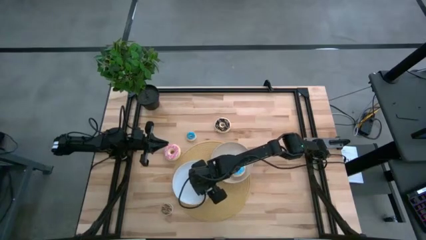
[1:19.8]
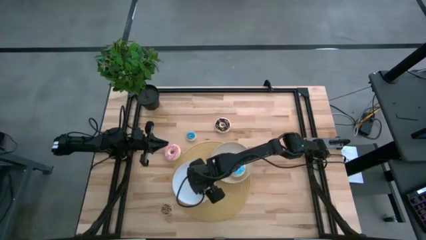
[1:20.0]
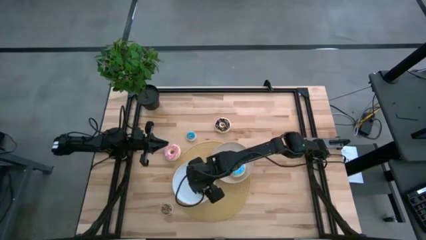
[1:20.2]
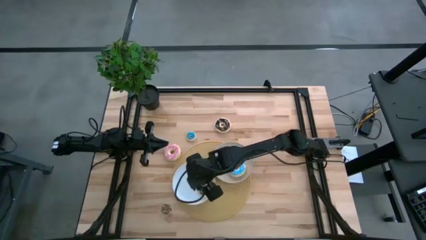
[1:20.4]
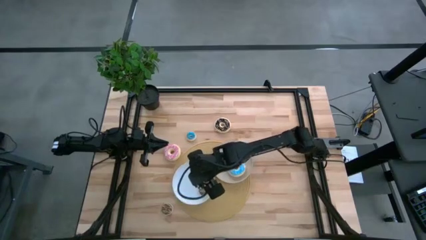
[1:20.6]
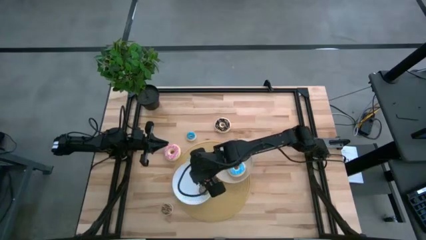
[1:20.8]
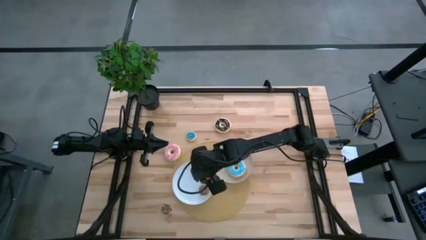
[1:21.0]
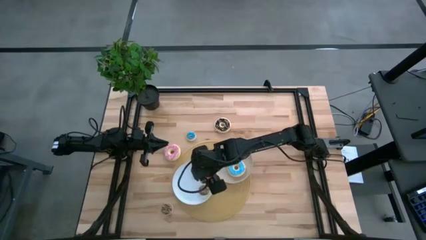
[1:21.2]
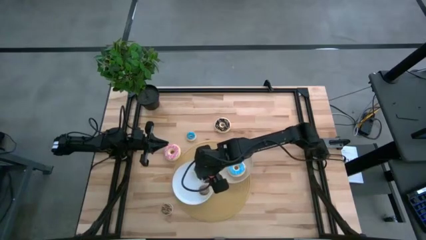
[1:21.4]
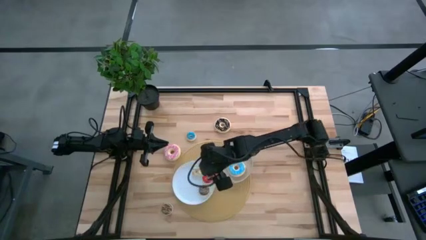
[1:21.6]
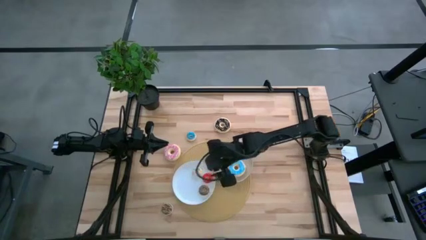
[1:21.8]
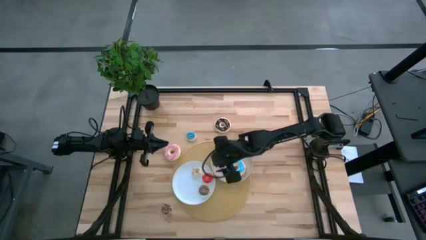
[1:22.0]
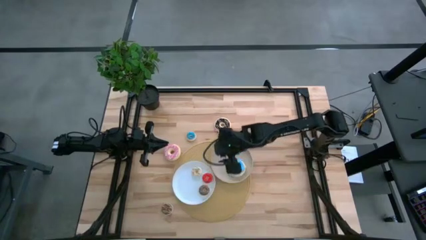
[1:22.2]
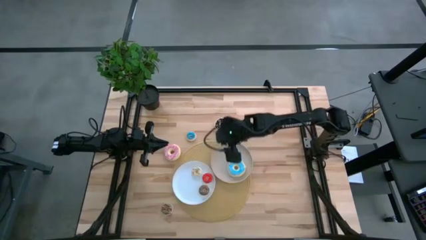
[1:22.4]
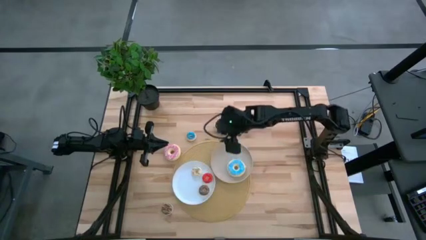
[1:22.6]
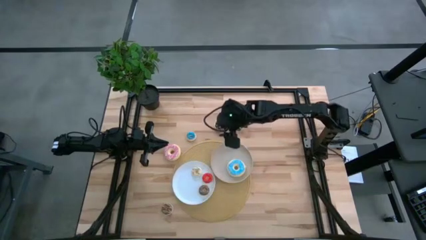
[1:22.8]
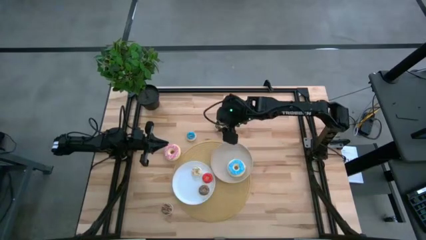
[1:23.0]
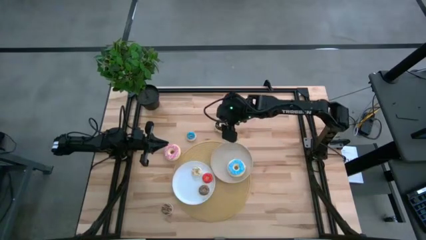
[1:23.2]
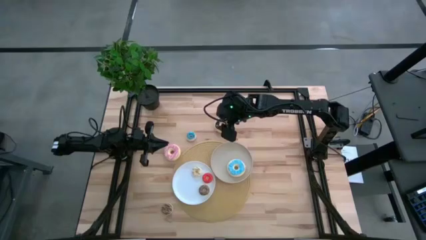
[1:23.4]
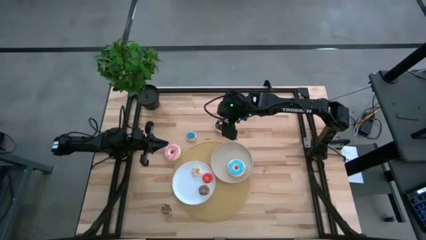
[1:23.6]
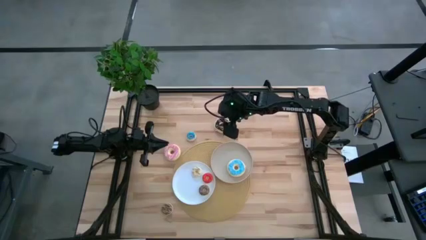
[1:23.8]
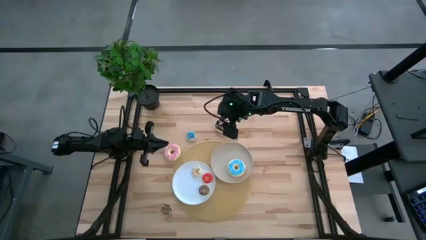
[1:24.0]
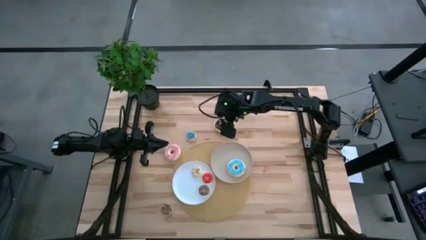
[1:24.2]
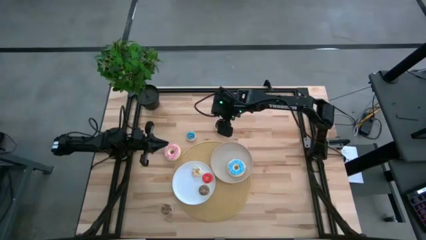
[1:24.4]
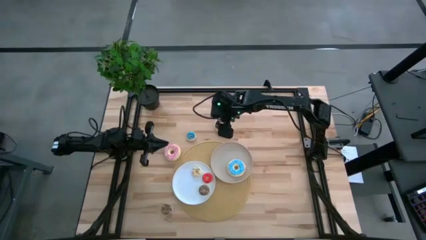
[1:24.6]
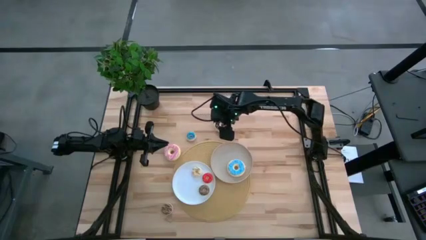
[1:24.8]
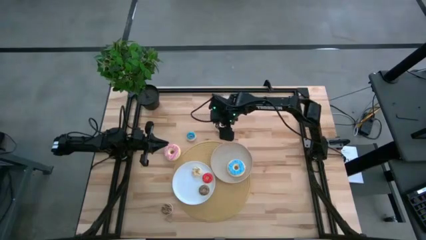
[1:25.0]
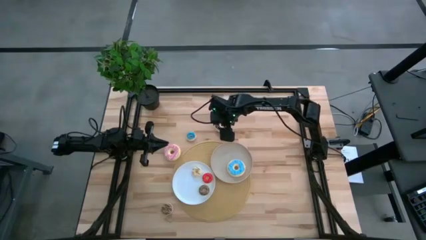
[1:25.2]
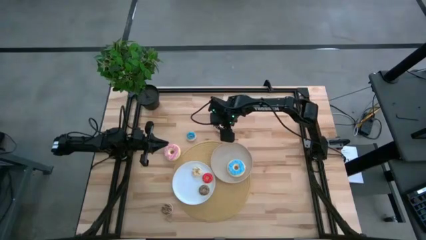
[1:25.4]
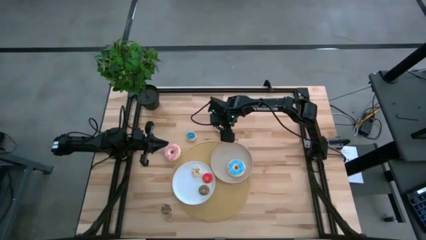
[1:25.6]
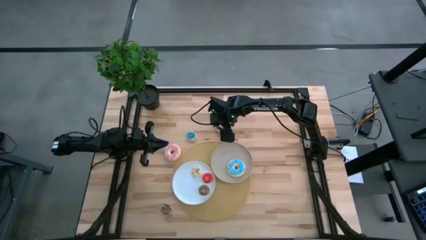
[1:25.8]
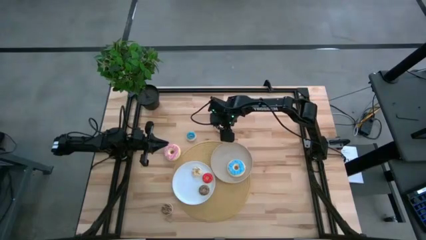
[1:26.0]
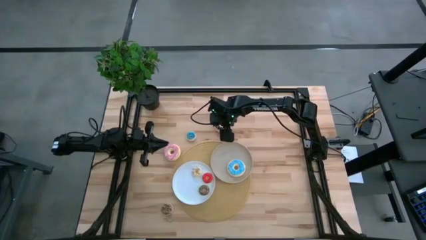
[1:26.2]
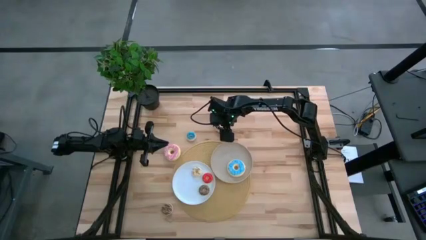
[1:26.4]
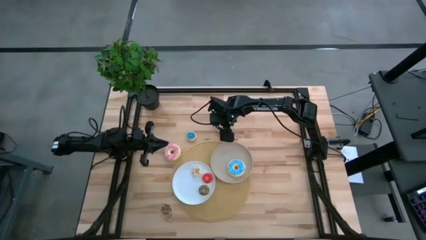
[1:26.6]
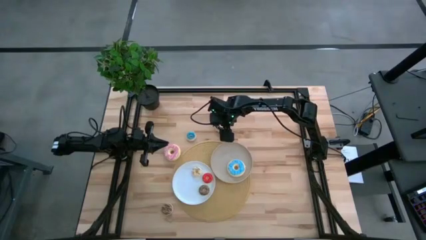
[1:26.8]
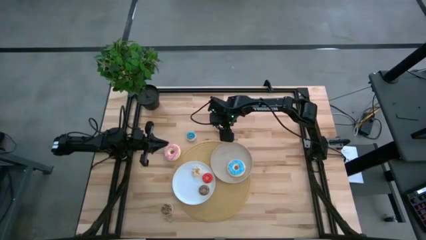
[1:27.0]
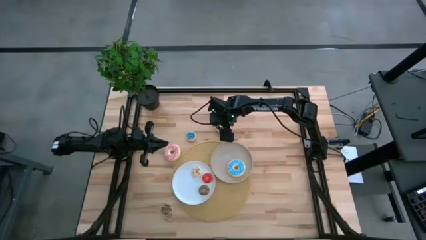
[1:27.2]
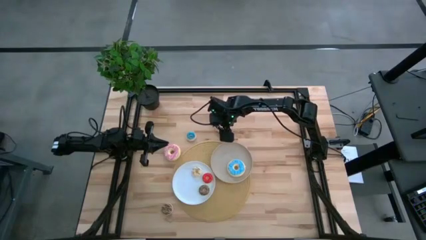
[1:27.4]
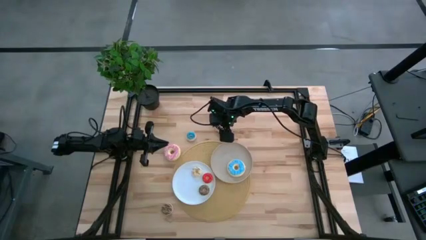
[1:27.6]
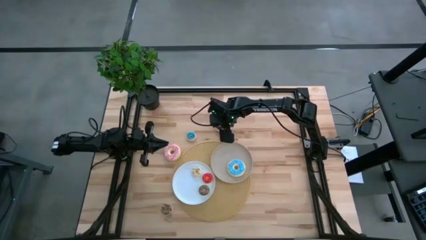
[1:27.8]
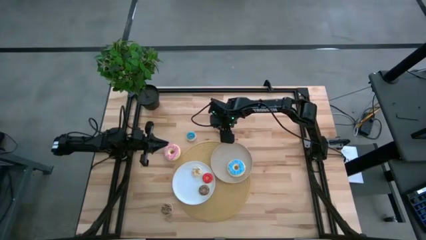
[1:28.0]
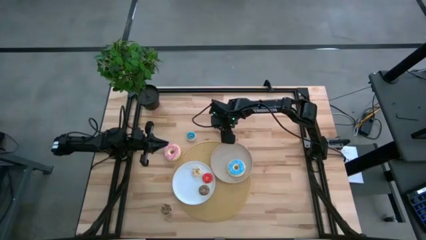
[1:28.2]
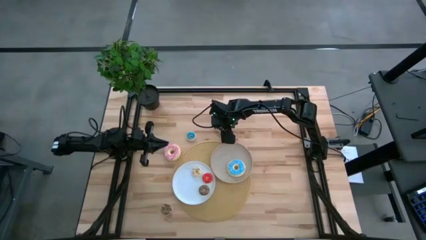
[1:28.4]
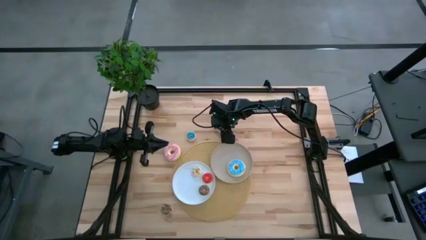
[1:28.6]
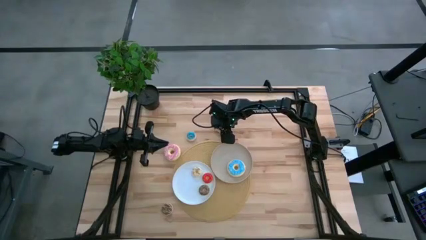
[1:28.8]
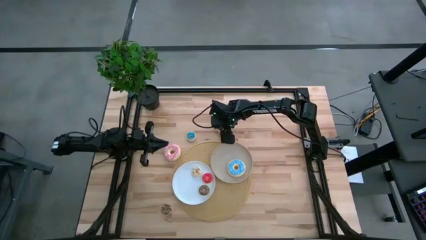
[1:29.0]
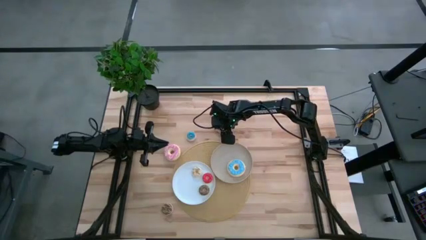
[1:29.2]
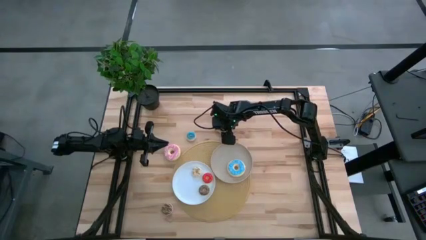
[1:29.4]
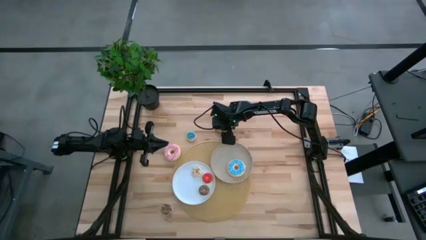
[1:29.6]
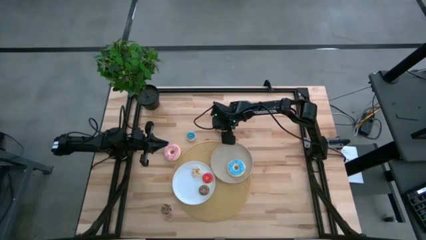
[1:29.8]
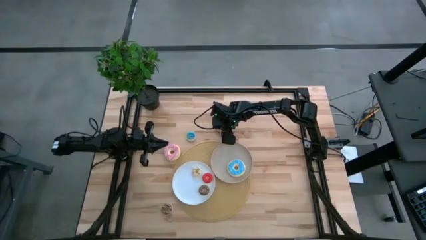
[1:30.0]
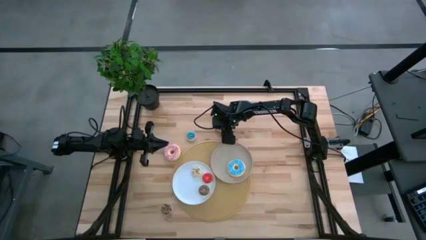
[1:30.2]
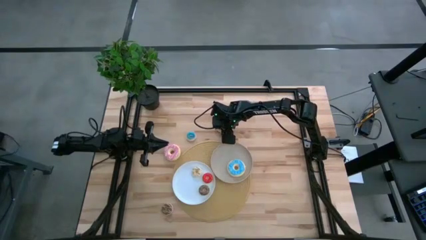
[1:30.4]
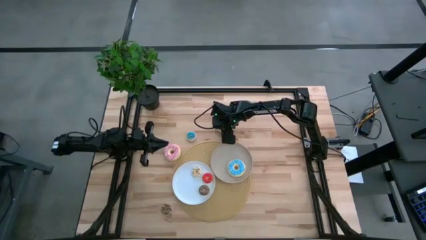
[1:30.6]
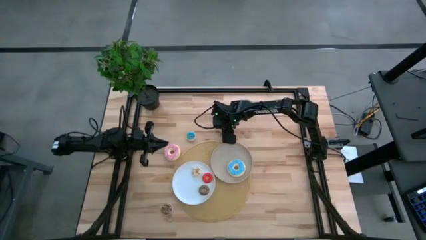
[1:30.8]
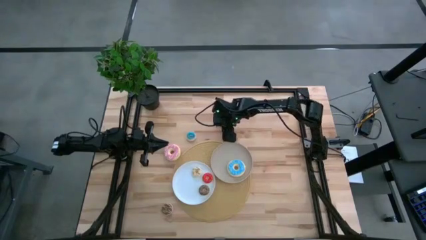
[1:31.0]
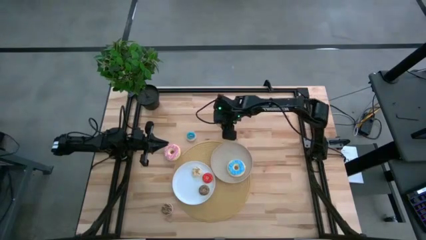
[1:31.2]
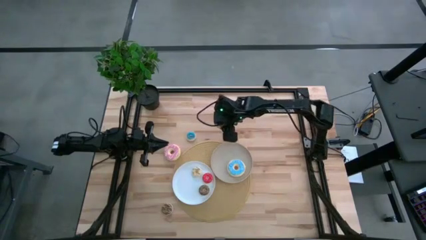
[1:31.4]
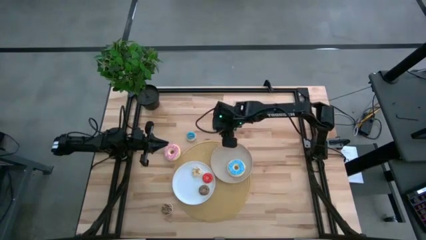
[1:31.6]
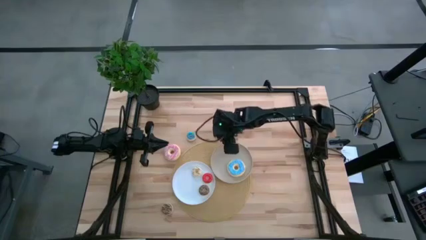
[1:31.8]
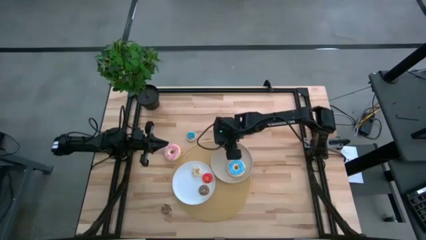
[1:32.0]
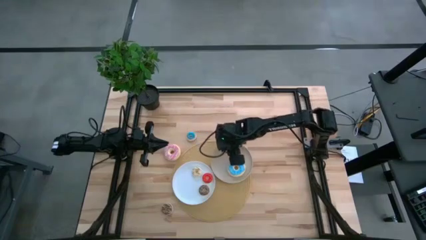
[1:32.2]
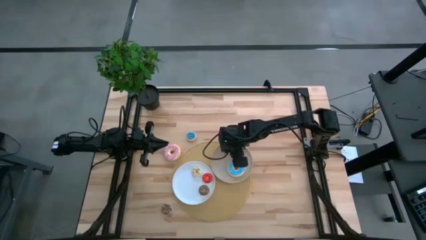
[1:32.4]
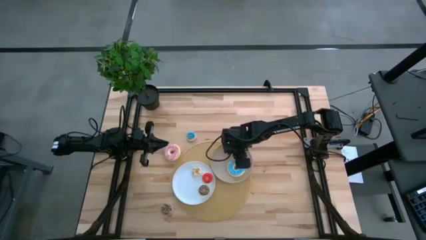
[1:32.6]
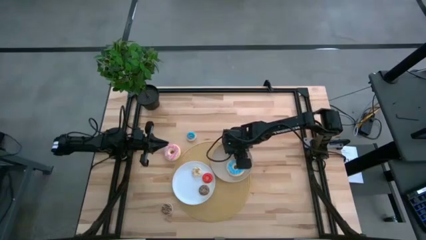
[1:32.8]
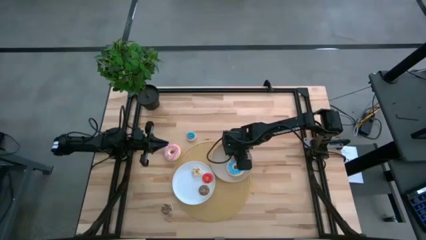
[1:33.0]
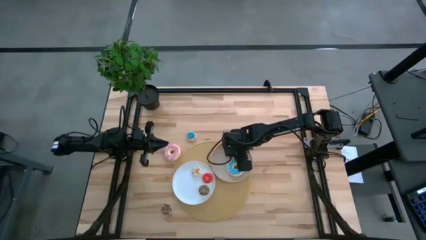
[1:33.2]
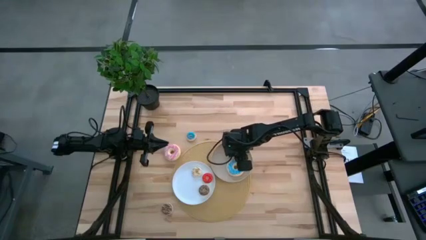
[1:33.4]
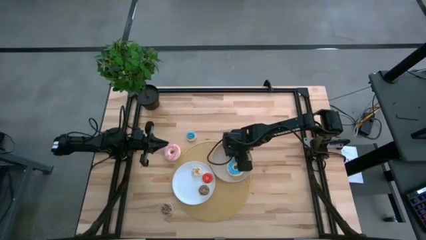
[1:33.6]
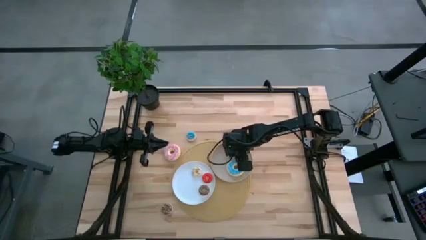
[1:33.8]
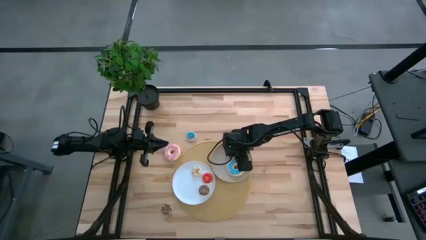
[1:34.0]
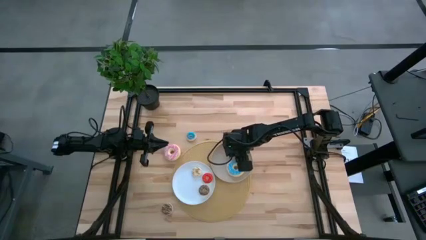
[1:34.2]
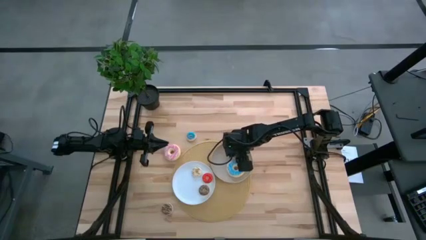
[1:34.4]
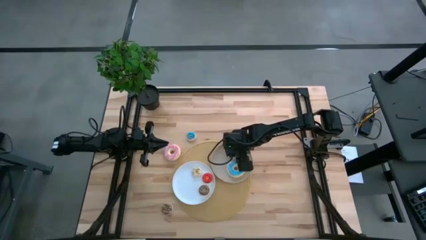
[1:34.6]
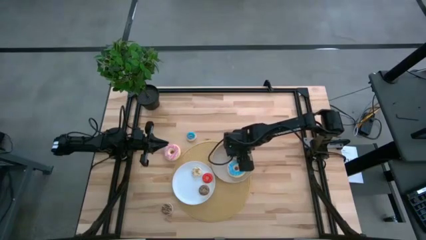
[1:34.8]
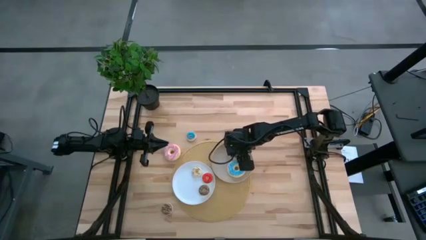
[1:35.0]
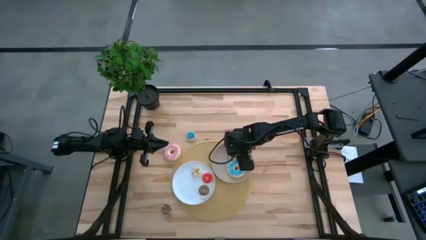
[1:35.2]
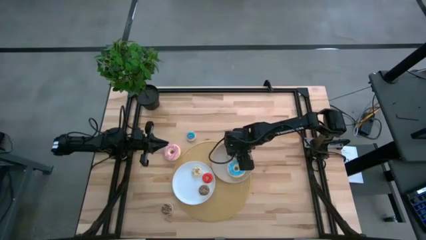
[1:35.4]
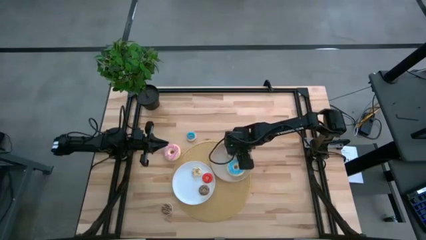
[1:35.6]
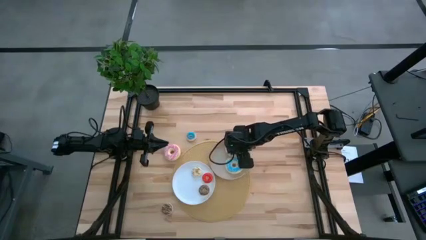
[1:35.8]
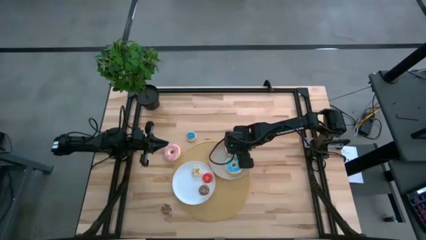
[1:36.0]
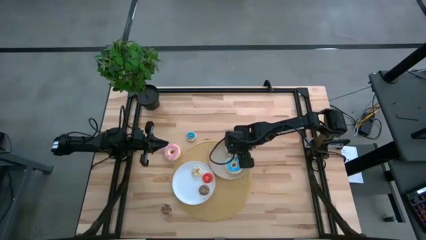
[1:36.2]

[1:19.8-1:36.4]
Task: Pick & Place donuts
Put the large black donut on the gray plate
